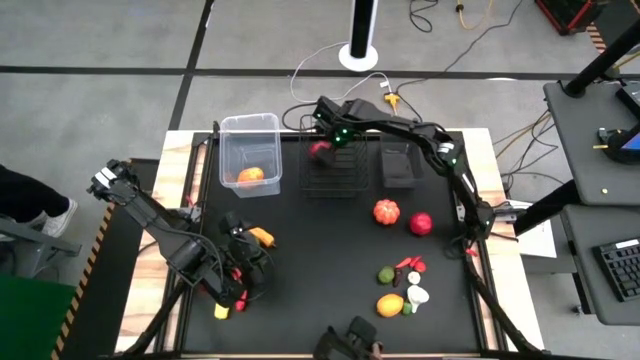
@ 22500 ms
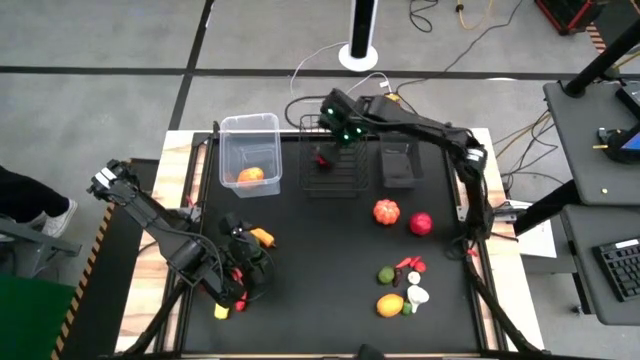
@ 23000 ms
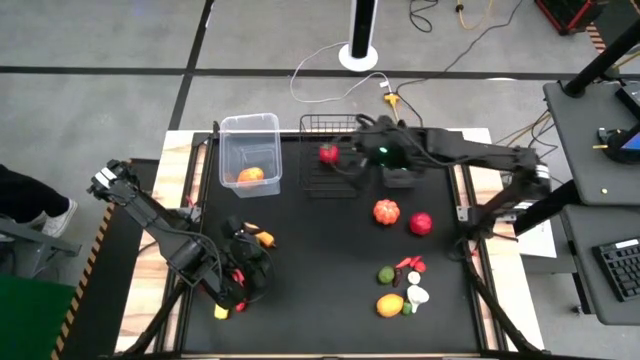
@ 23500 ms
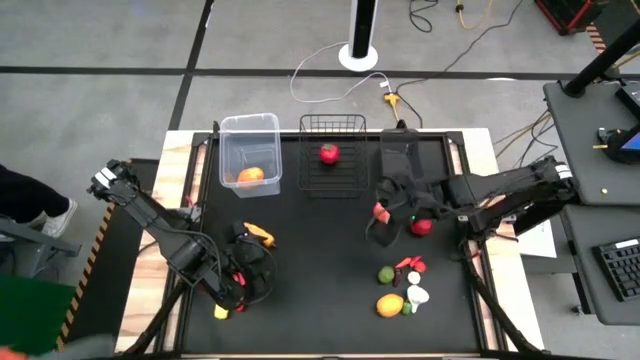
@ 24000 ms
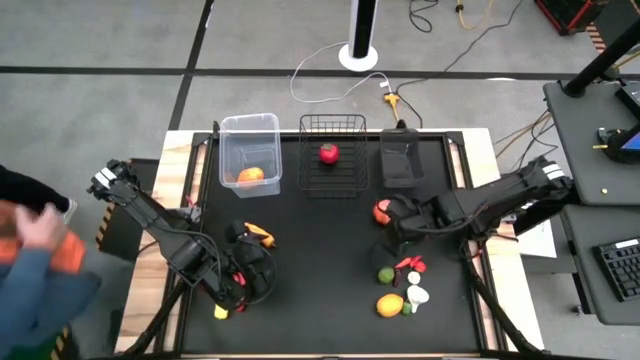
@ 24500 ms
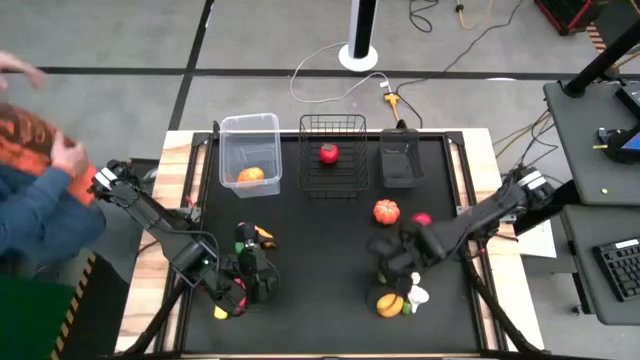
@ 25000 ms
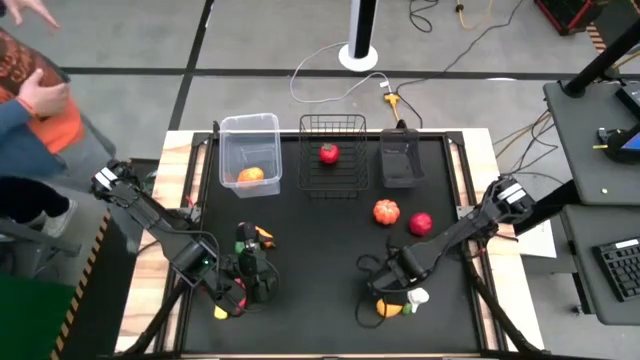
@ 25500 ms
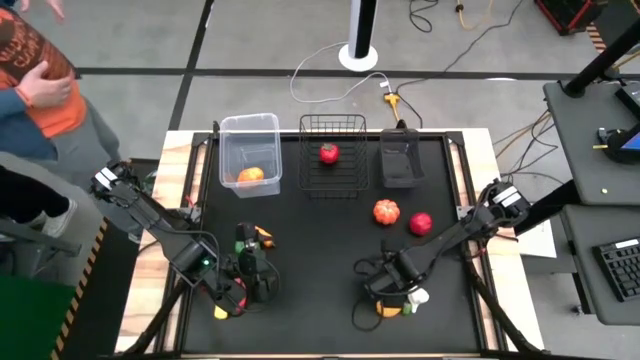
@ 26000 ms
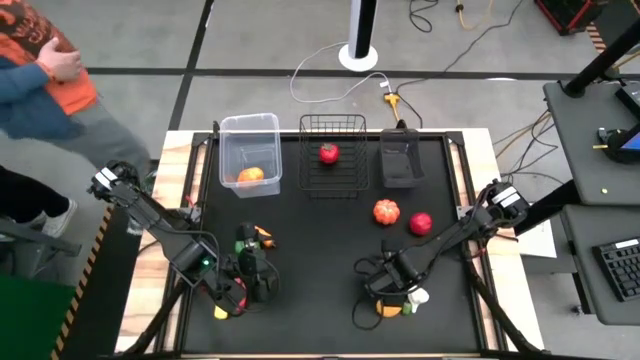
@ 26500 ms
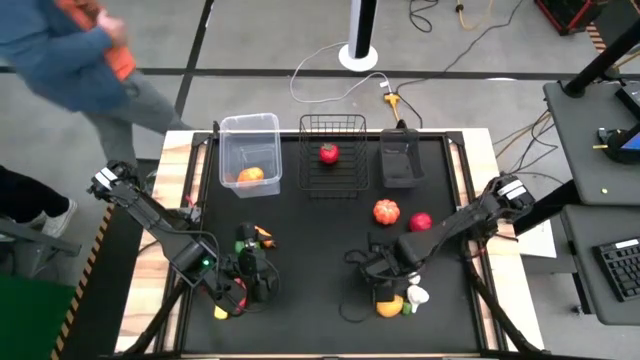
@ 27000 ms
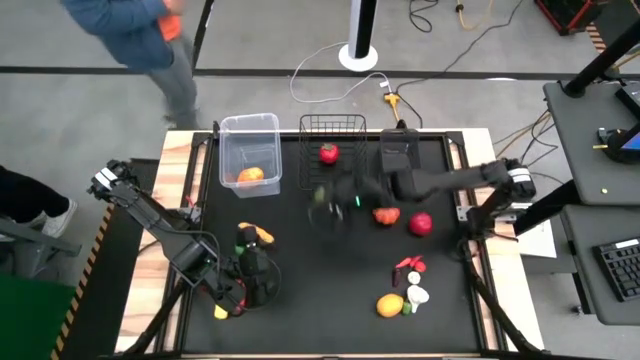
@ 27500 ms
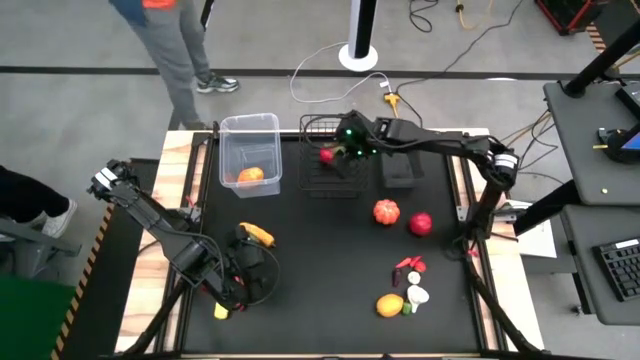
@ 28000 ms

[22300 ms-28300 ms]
Task: Sort produce into baskets
Put the lime into the wire basket

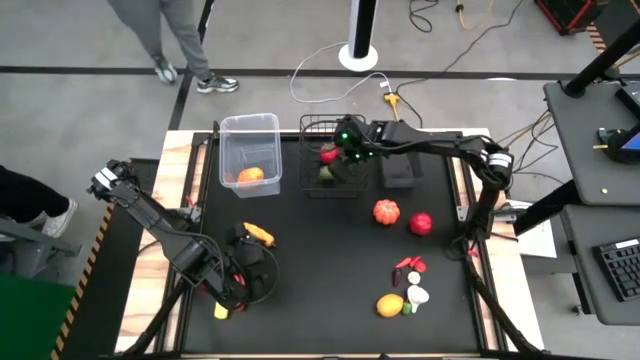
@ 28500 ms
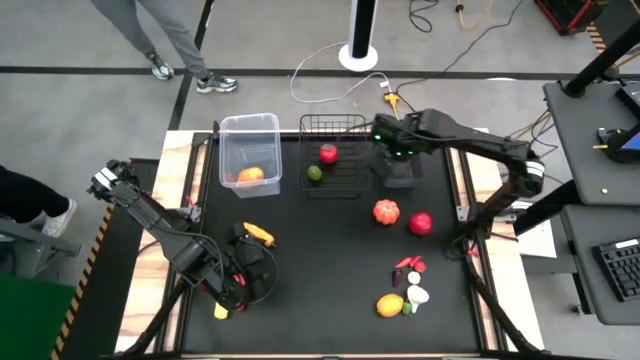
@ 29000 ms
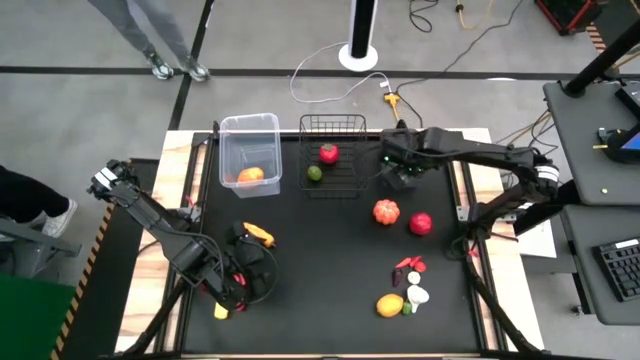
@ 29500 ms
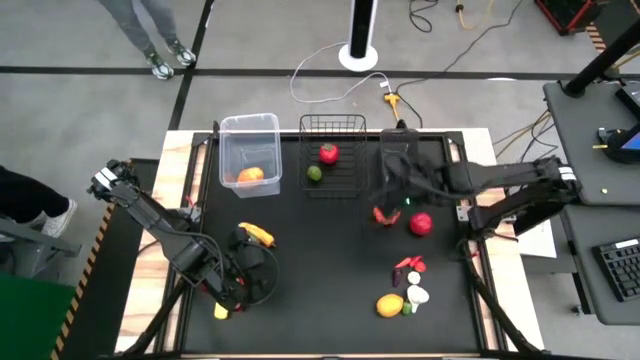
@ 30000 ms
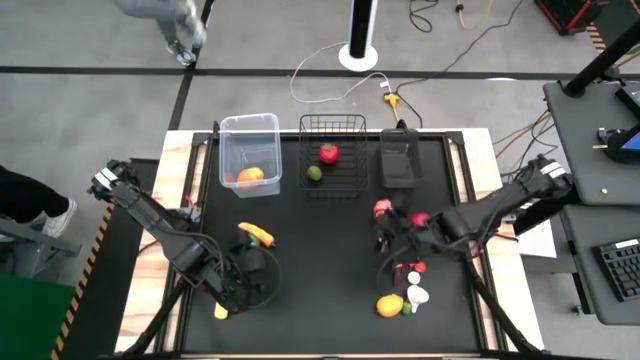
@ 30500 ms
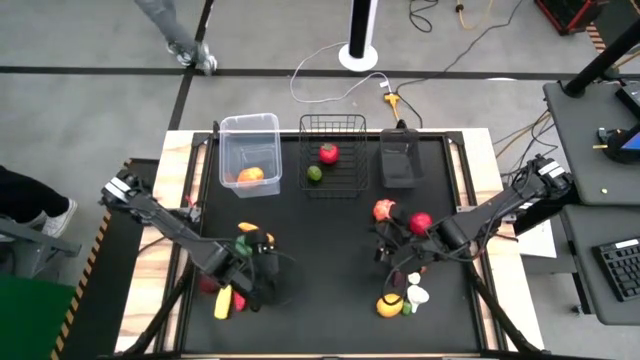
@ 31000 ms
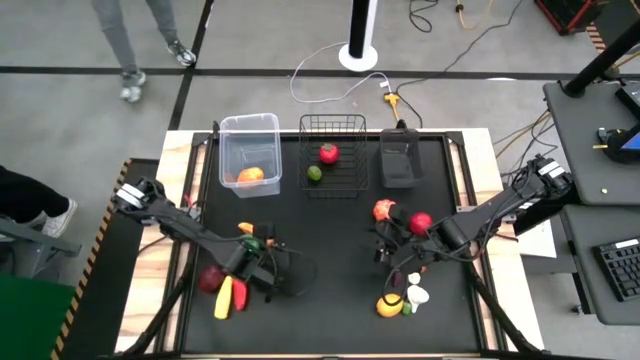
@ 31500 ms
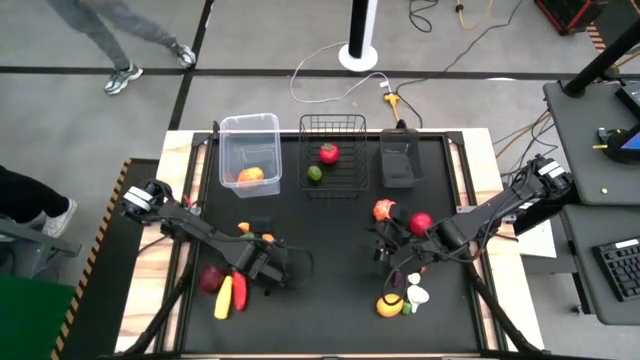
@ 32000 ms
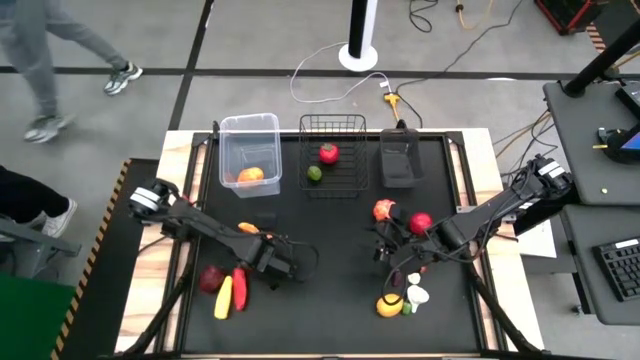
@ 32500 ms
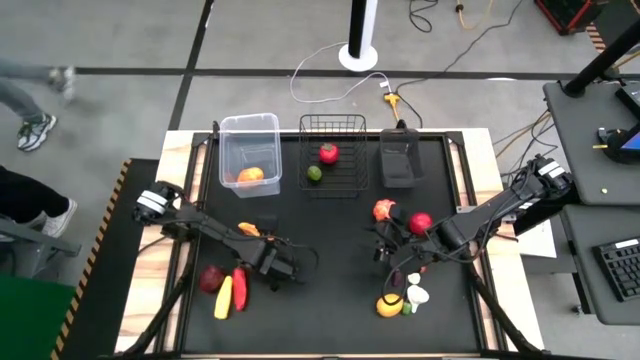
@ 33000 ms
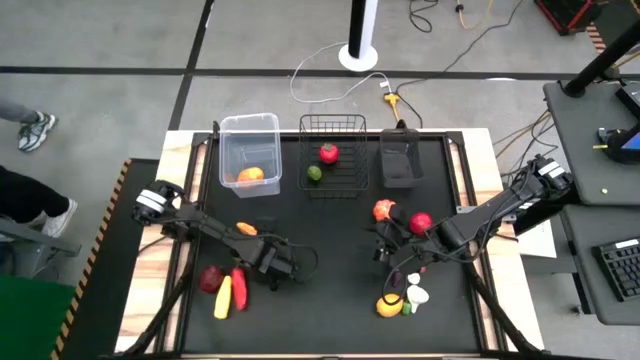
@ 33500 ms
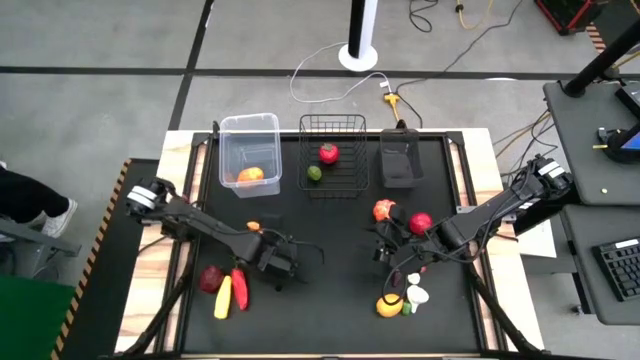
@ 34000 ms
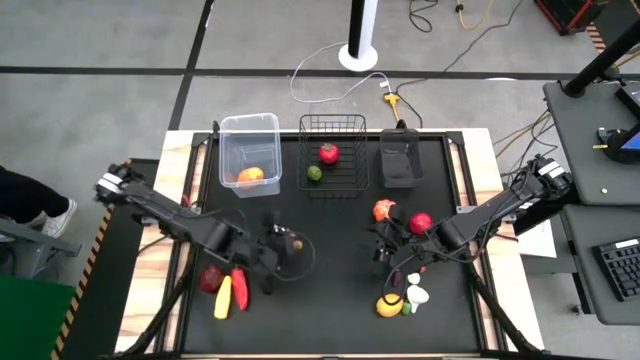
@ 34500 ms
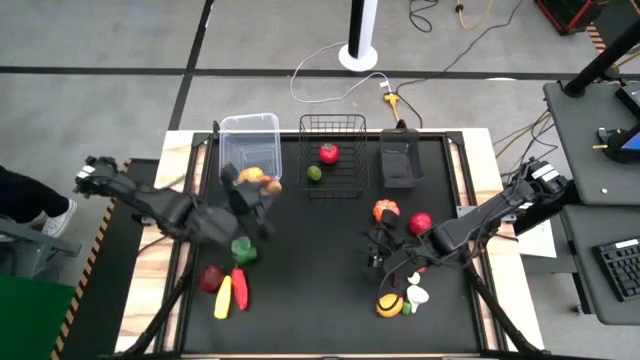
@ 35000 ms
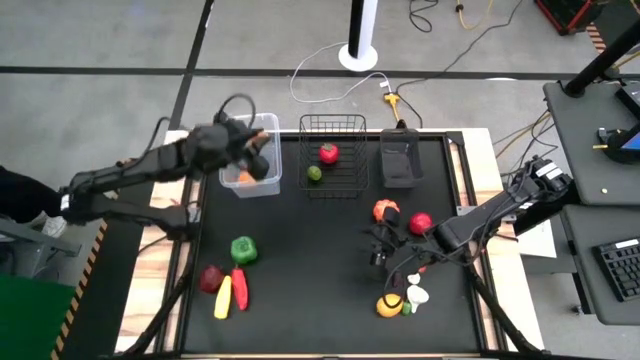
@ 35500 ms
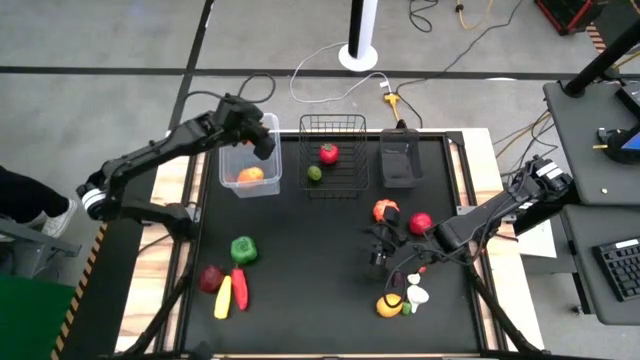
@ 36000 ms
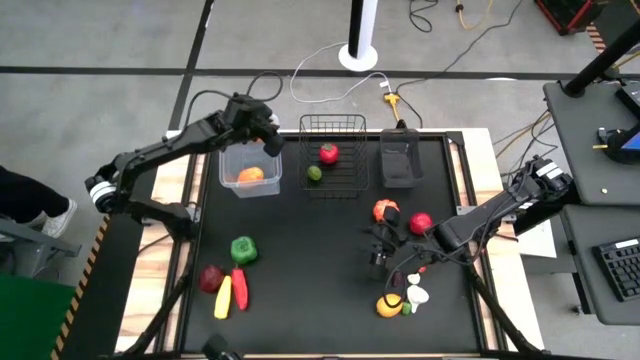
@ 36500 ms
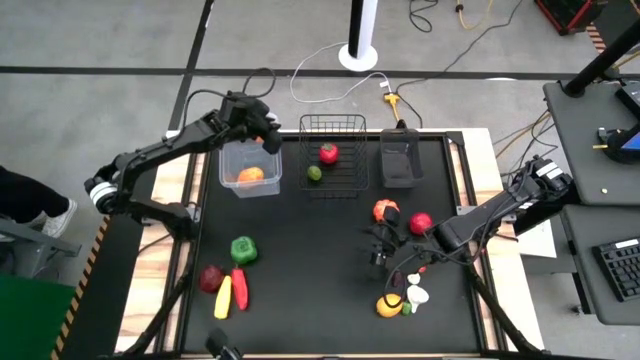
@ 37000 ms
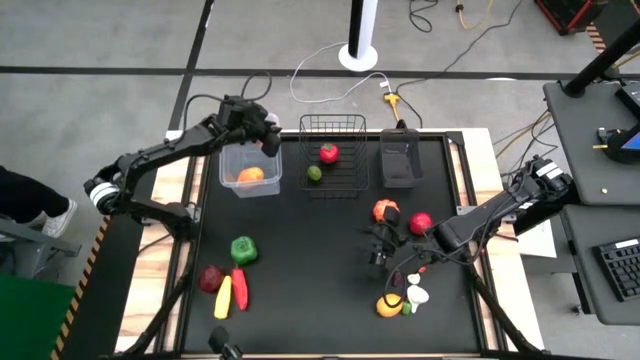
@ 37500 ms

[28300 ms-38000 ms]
Put the orange chili pepper into the transparent basket

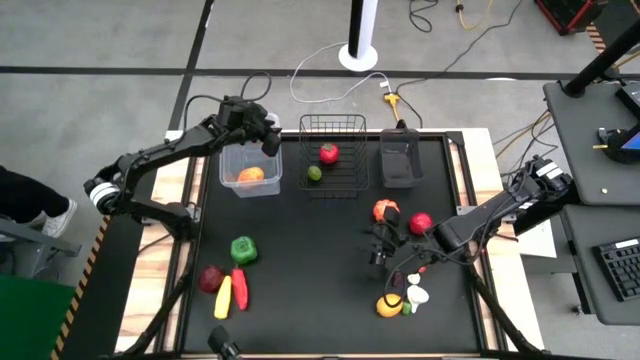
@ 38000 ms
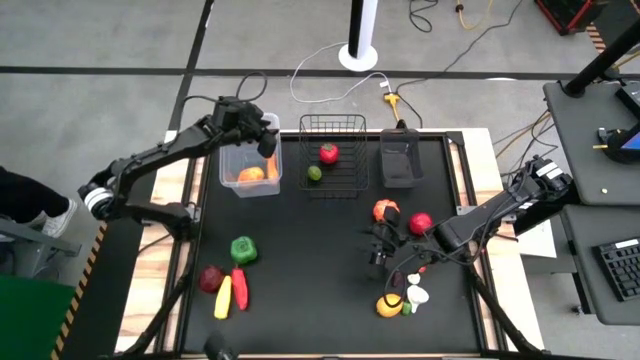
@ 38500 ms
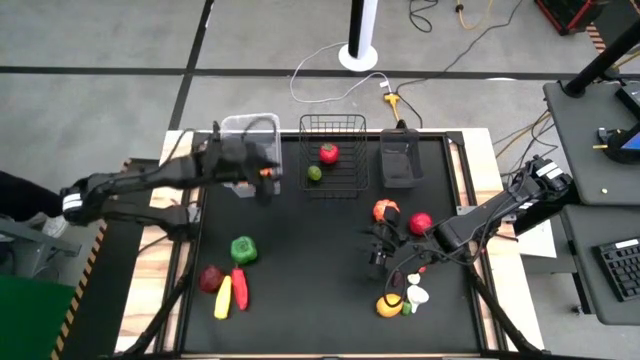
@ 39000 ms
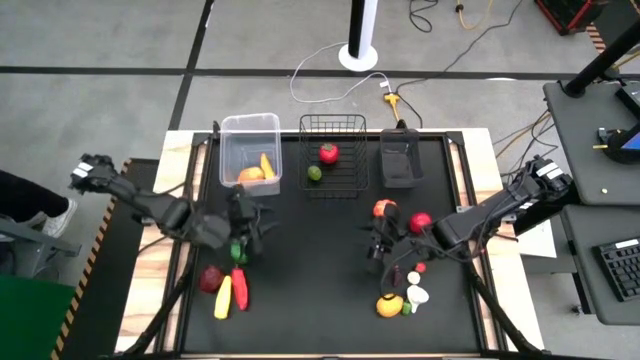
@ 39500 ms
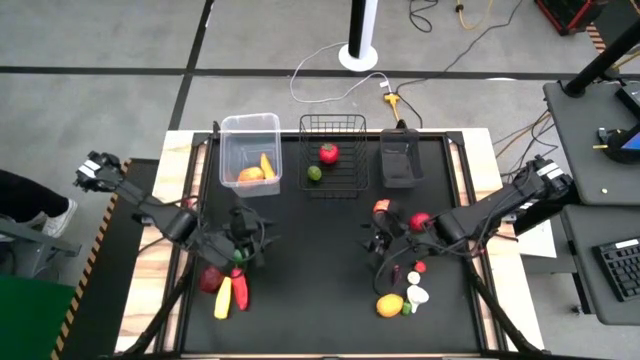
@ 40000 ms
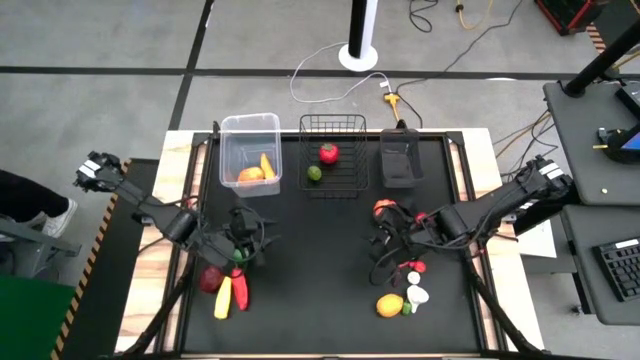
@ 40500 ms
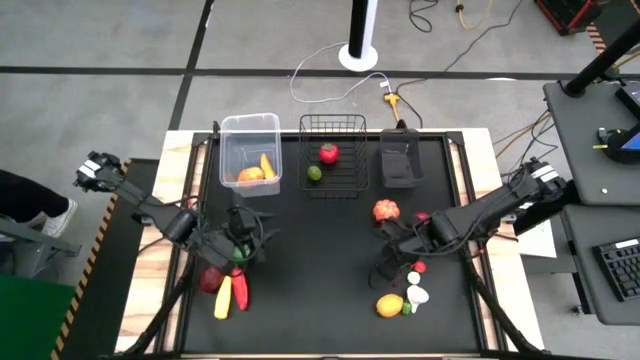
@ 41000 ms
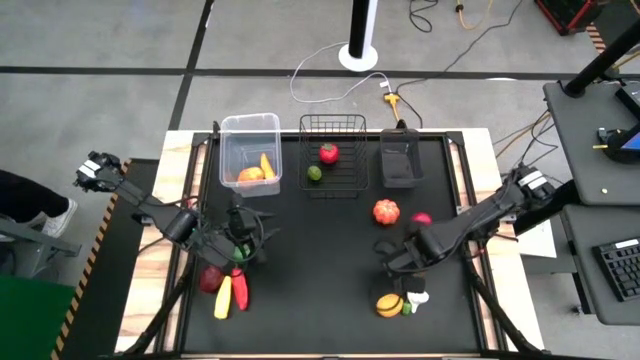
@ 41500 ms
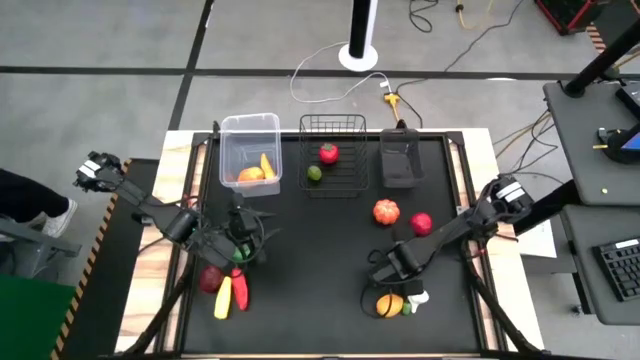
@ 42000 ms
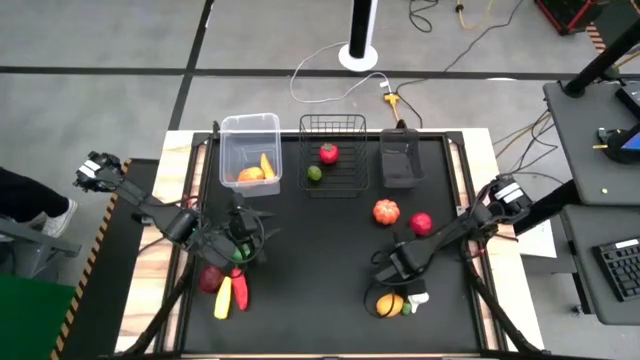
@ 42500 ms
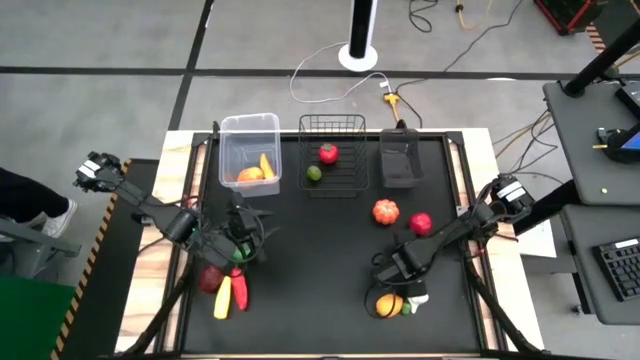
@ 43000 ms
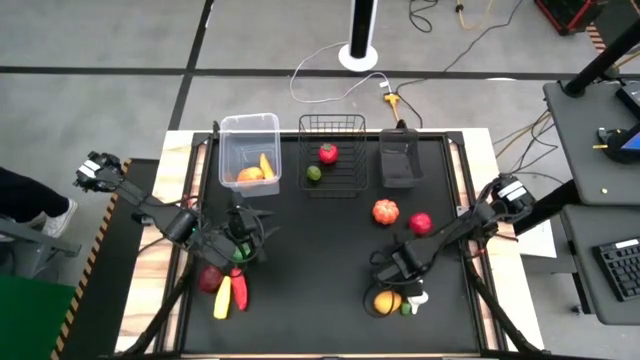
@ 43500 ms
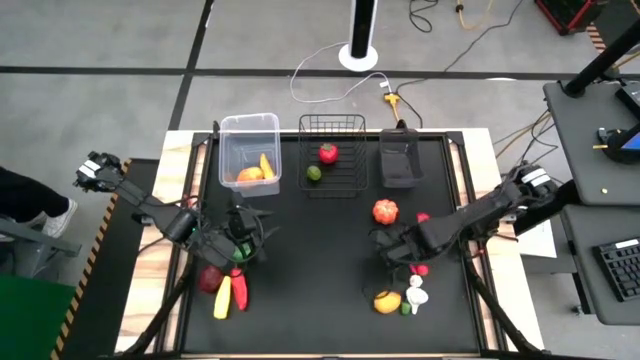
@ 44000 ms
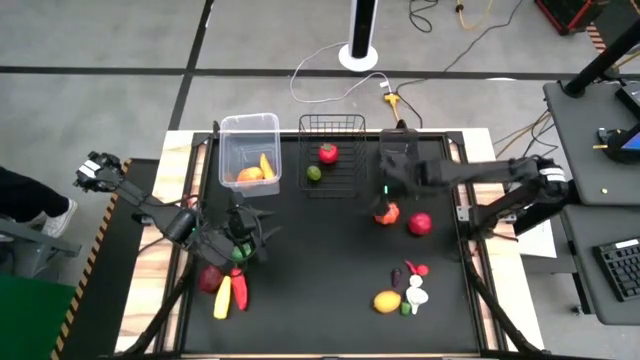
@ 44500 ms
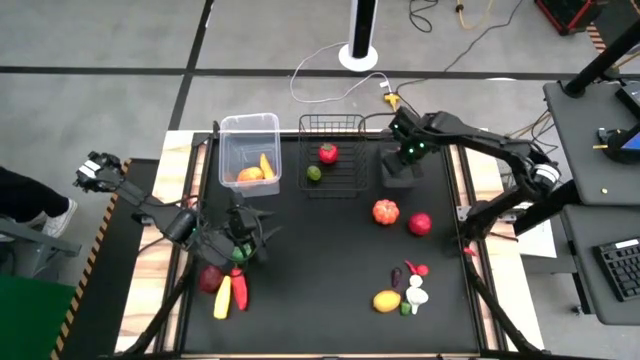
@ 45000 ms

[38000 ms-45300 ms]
Put the small orange chili pepper into the black basket
